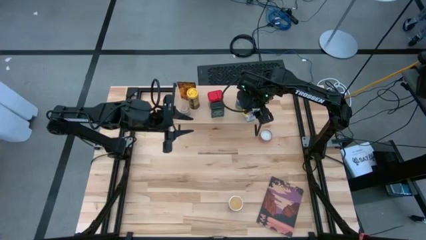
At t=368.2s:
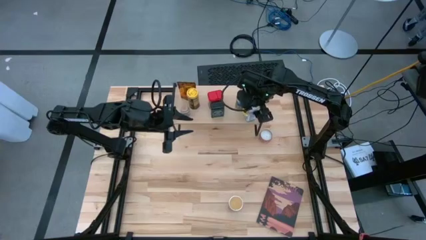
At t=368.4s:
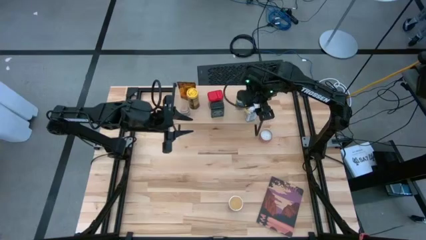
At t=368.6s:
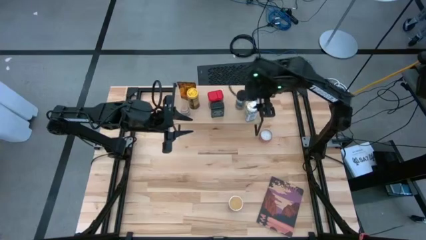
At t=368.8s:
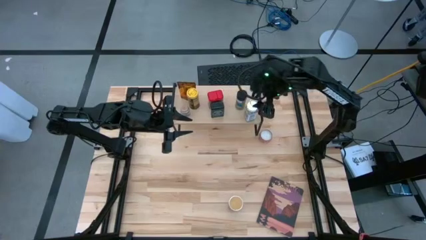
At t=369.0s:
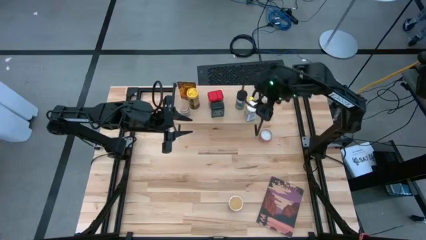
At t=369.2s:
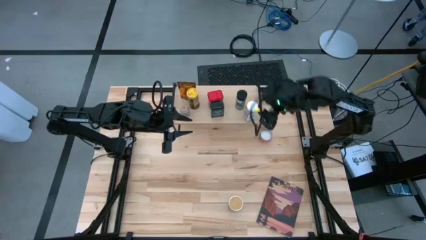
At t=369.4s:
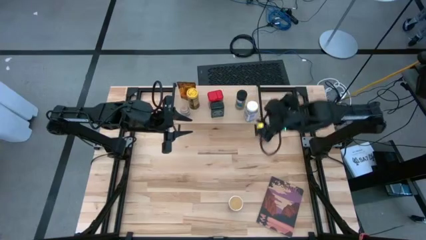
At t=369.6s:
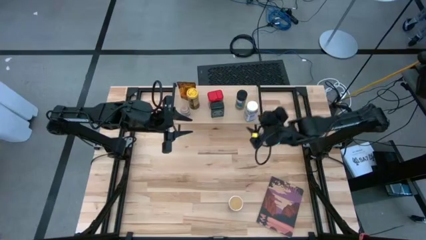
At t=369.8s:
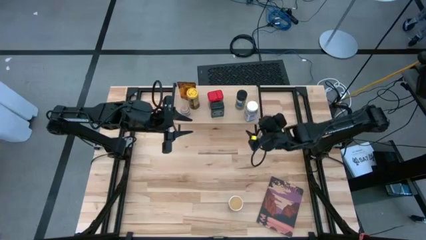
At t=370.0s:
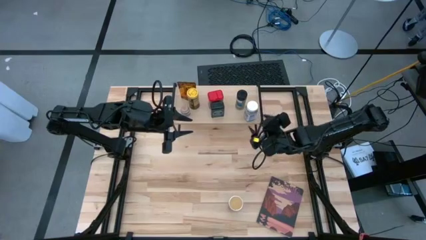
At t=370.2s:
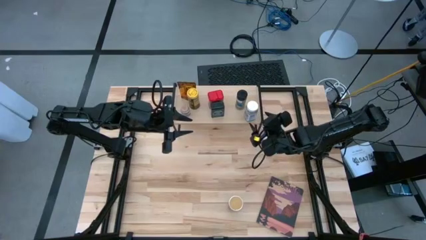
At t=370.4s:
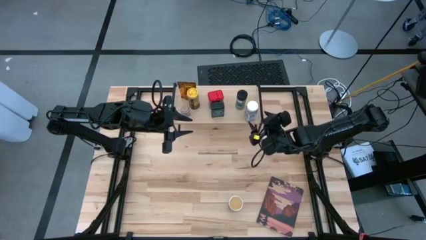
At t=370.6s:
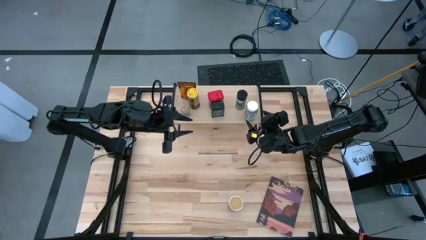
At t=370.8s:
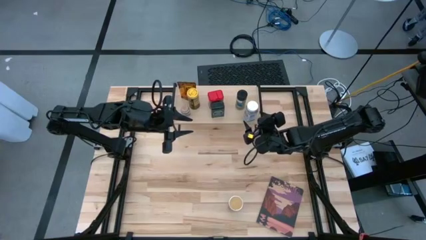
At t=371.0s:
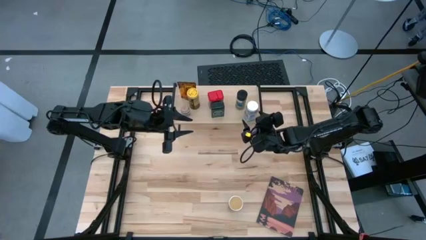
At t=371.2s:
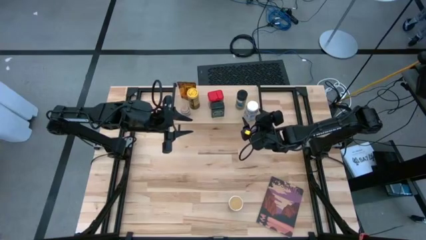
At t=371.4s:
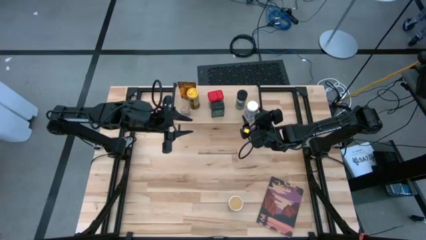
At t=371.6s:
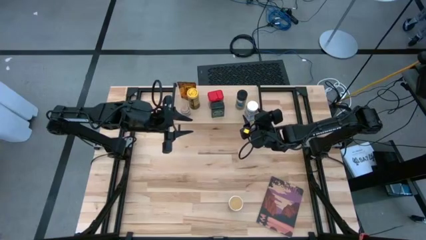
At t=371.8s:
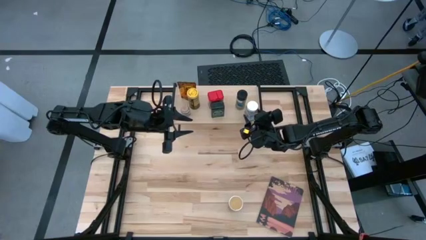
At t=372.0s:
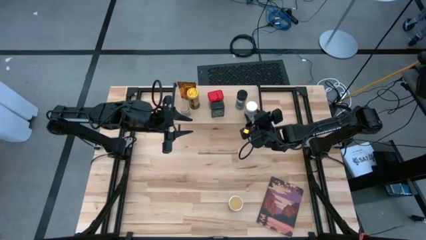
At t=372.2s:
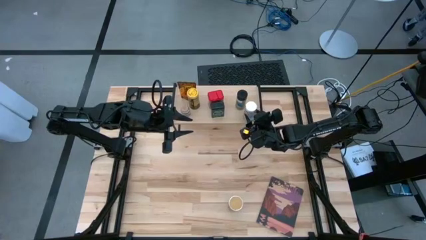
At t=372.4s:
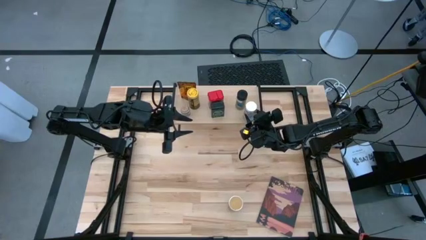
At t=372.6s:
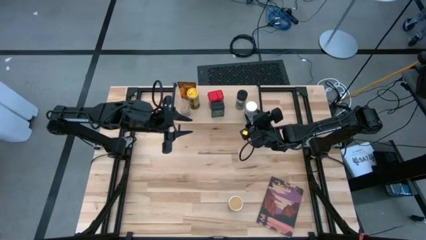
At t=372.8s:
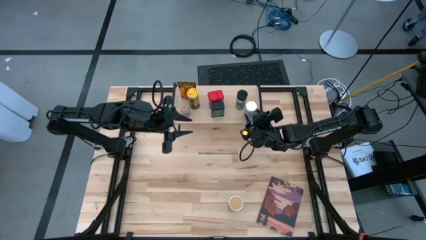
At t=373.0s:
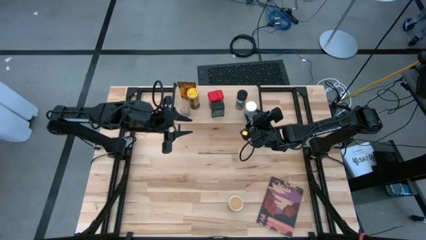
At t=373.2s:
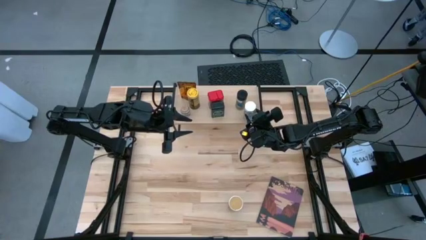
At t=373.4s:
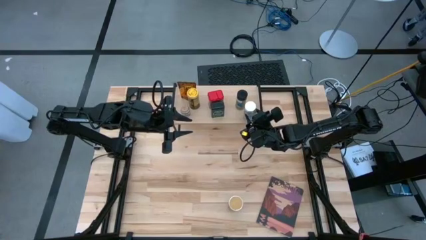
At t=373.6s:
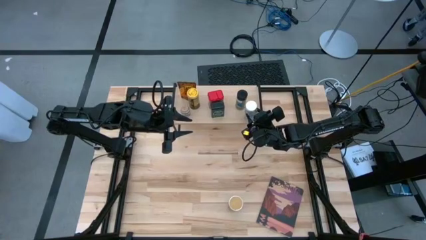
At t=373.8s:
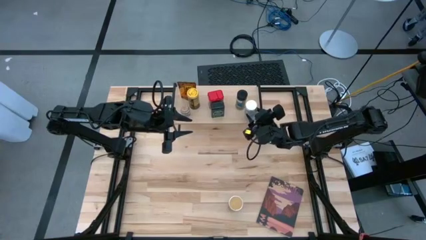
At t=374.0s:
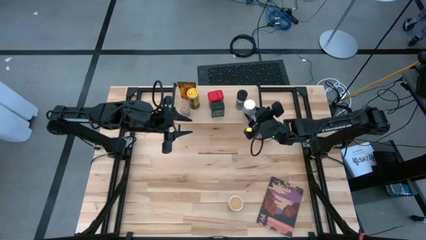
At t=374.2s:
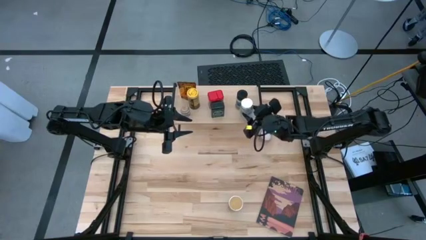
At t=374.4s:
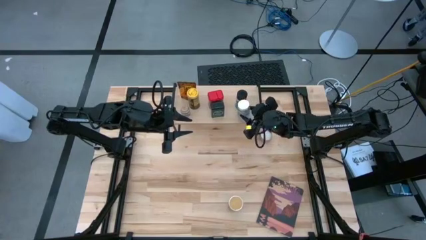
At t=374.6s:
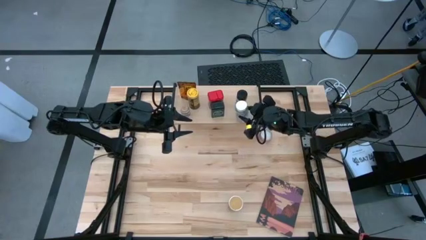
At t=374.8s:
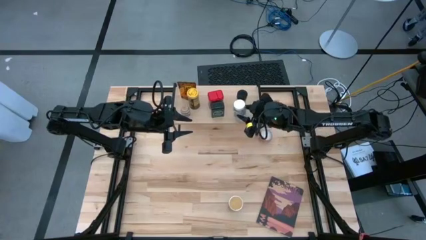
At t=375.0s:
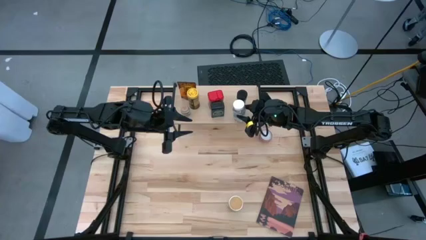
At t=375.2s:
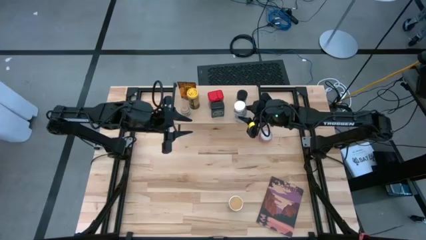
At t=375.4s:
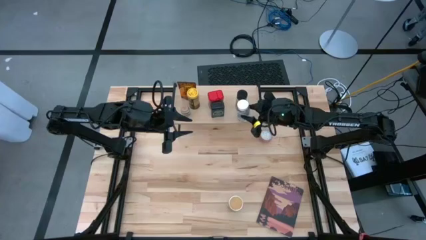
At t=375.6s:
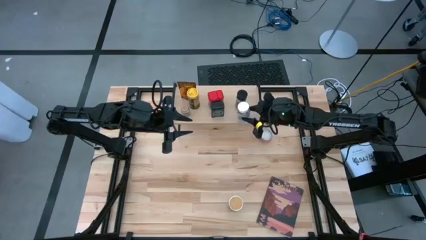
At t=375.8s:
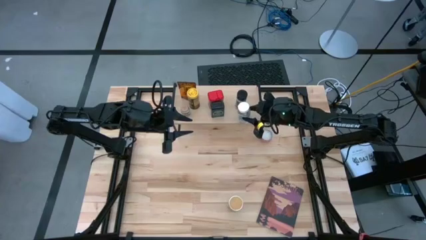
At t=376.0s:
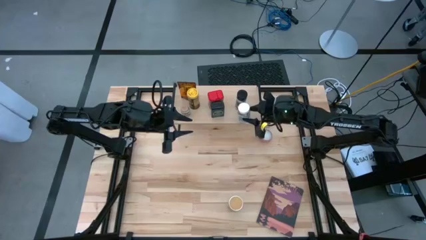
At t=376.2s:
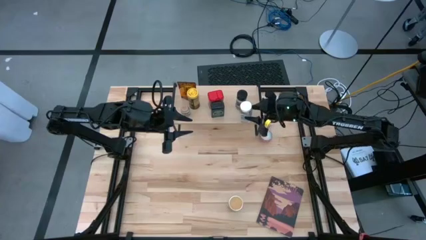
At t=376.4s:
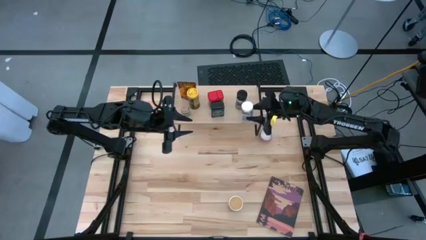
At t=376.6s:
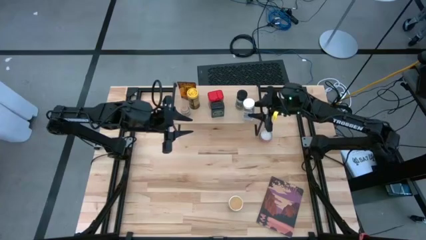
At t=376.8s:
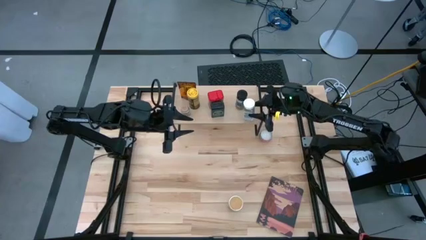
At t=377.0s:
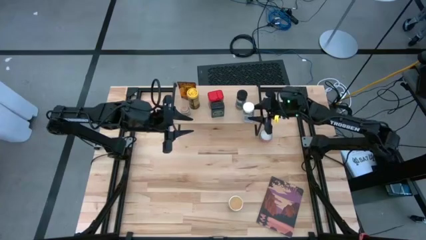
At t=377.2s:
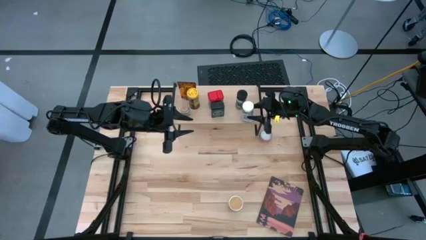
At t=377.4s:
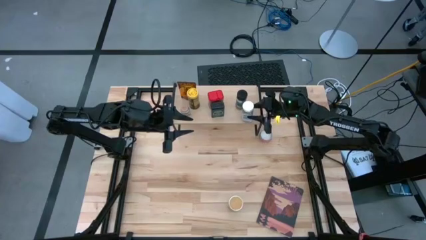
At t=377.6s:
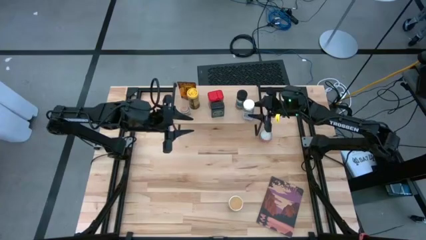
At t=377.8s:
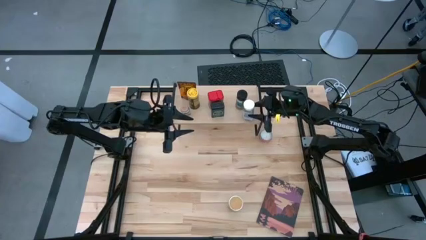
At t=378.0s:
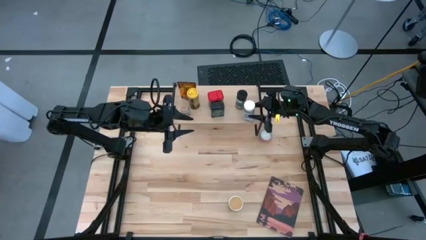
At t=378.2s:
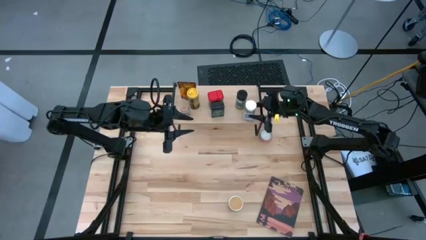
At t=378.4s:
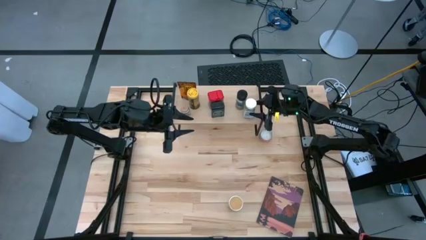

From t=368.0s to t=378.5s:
Task: Shelf spices
Put the white spice bottle on the shelf

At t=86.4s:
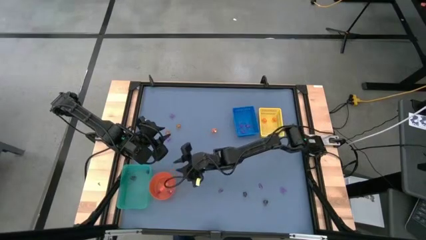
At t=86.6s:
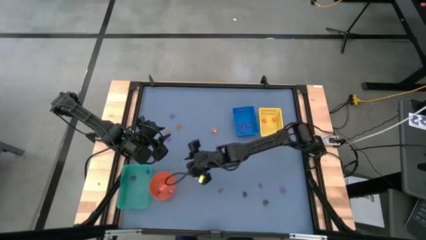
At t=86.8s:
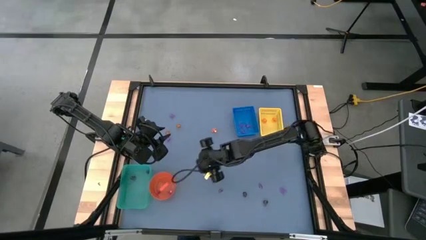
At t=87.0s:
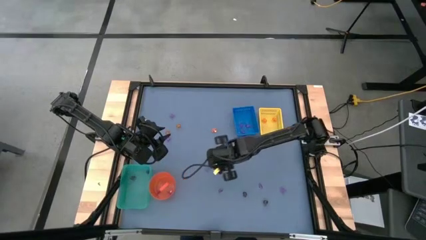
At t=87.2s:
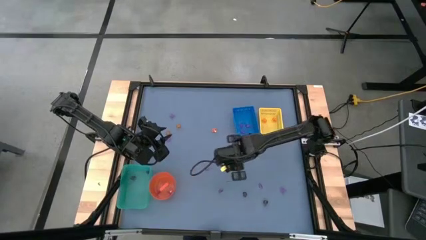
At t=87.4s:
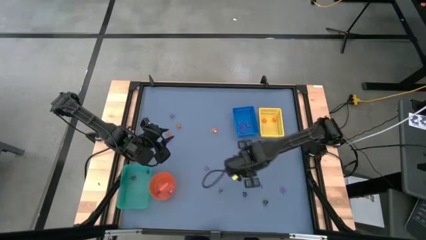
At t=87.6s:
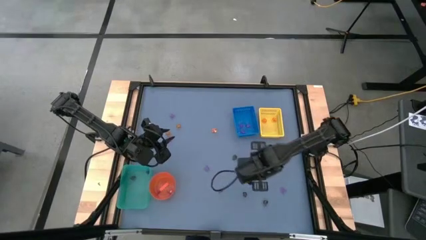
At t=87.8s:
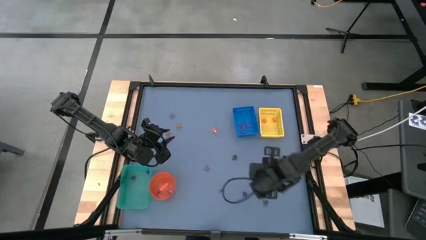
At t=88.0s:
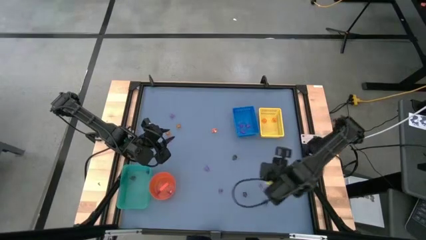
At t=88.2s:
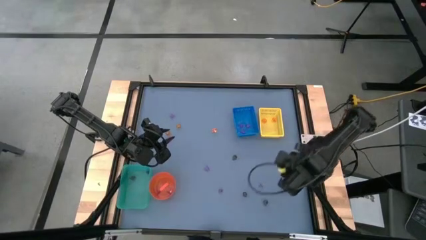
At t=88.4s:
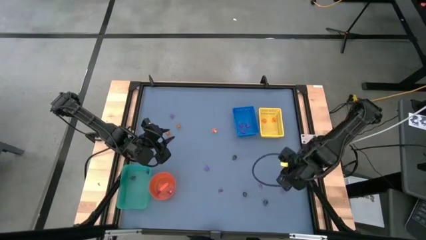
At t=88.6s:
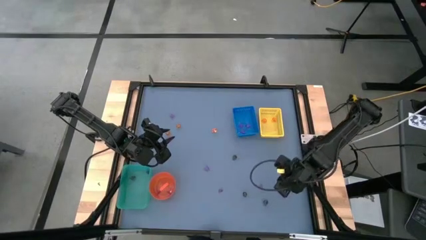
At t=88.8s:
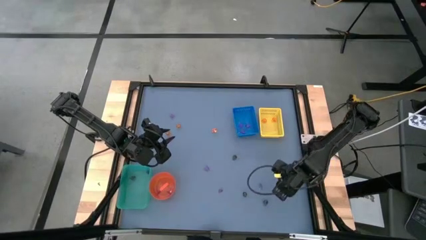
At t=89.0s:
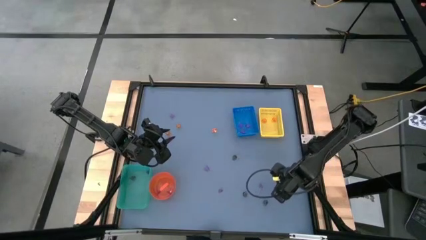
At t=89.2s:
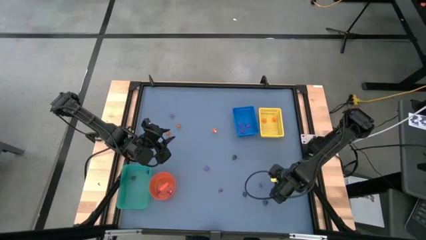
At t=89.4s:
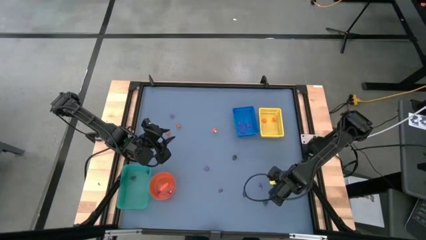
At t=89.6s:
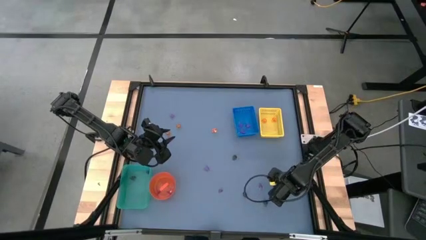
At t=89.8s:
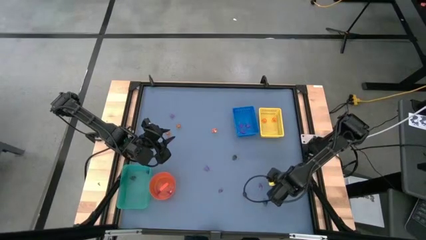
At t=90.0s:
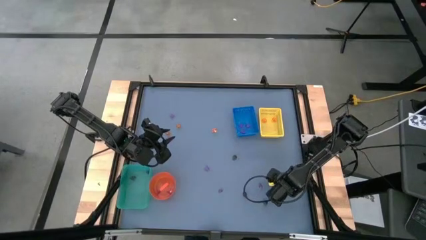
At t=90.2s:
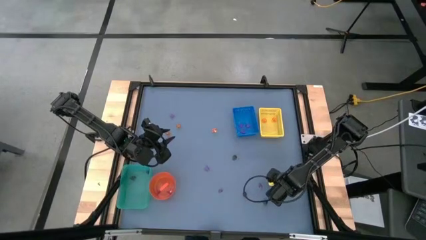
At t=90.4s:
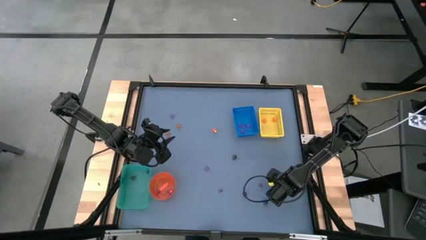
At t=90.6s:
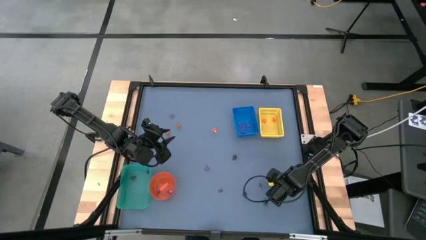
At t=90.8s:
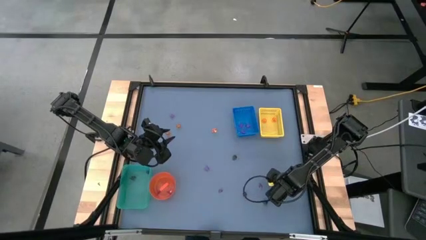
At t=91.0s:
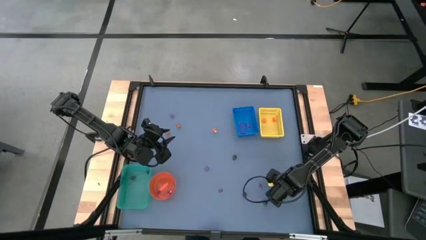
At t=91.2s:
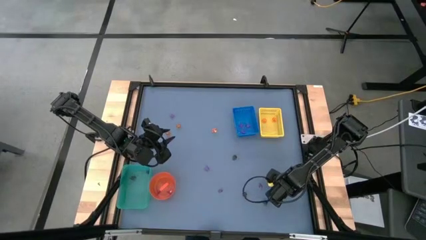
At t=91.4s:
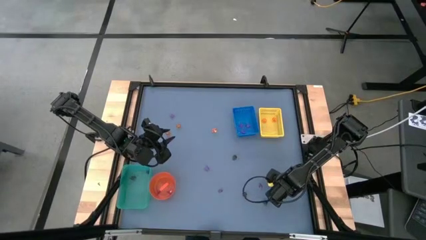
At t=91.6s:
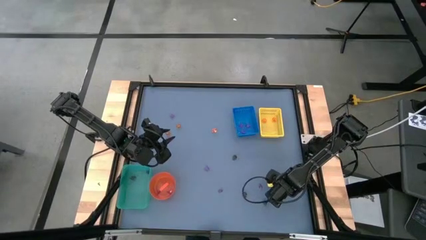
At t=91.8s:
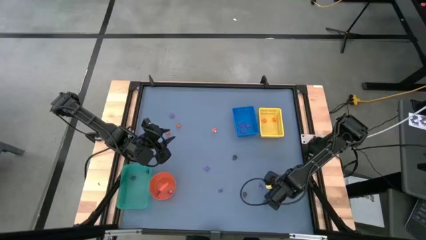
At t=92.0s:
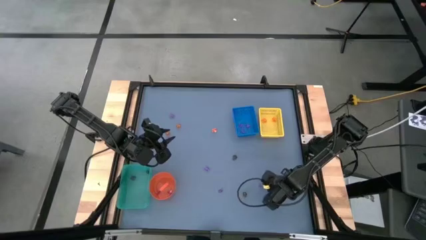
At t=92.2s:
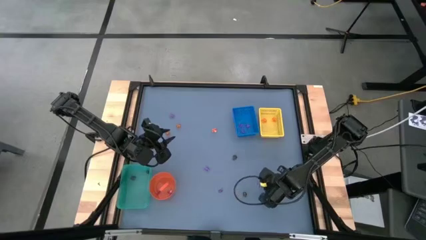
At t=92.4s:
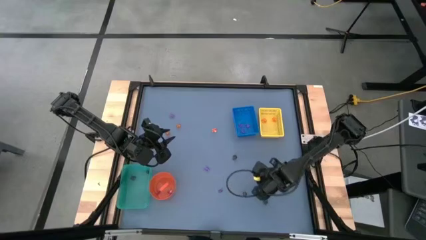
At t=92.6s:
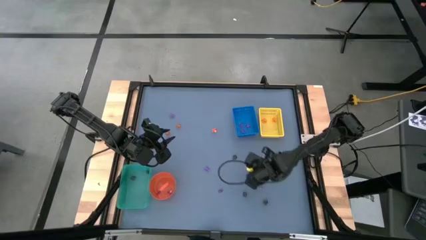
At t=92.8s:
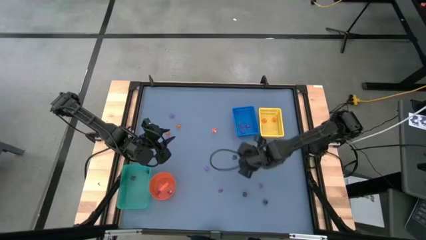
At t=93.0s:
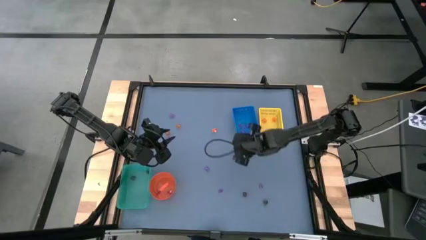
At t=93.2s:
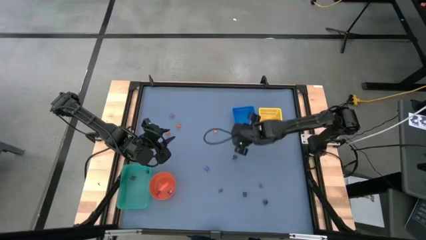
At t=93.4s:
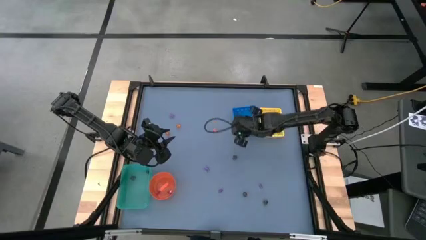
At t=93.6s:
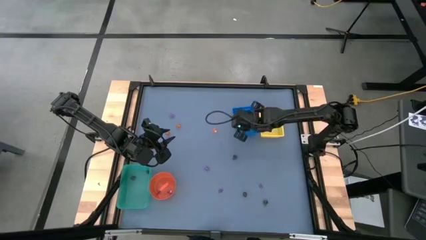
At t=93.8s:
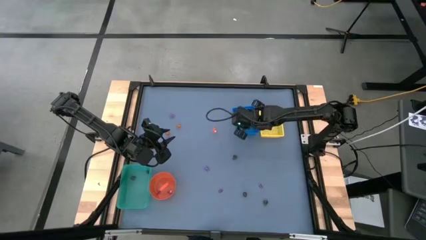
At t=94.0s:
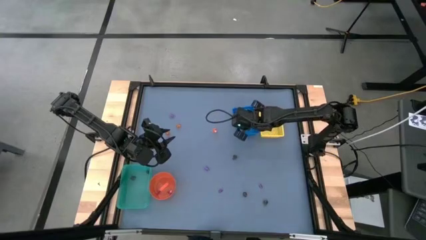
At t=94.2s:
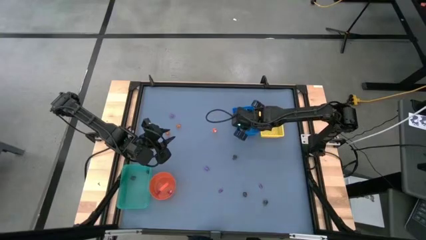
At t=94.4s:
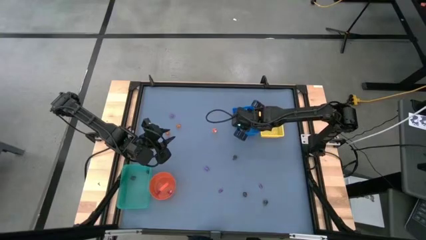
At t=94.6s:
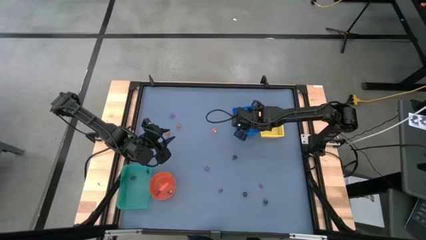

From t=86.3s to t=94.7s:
Task: Sort Halloween decoration
Put the violet spider toy into the blue box
